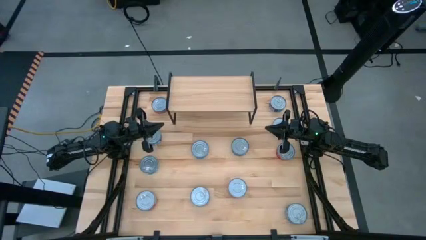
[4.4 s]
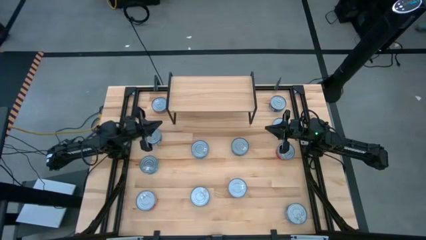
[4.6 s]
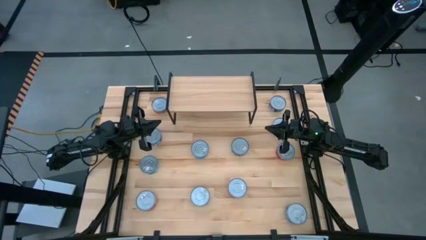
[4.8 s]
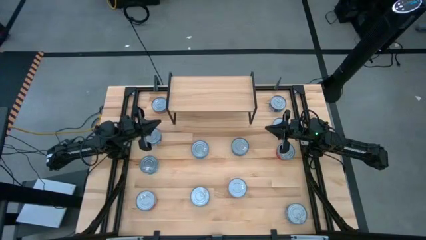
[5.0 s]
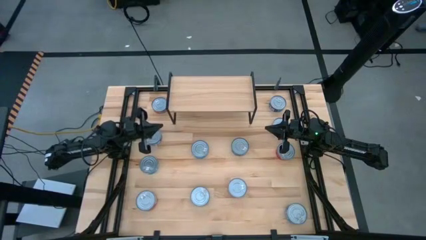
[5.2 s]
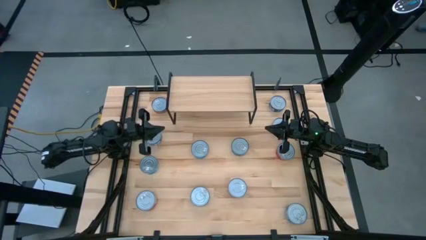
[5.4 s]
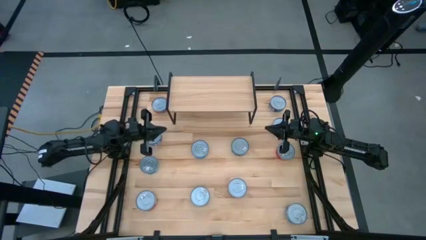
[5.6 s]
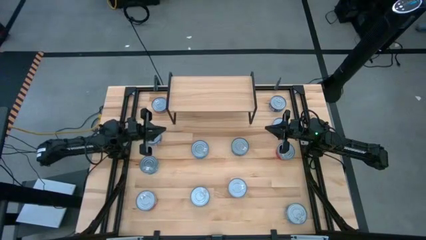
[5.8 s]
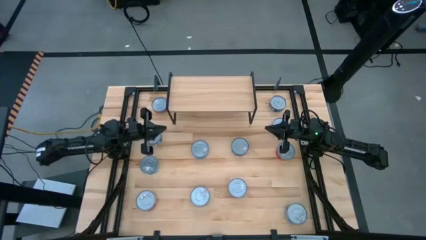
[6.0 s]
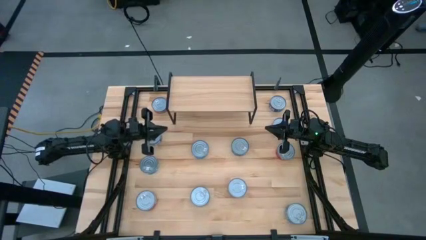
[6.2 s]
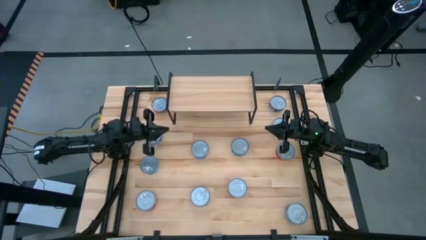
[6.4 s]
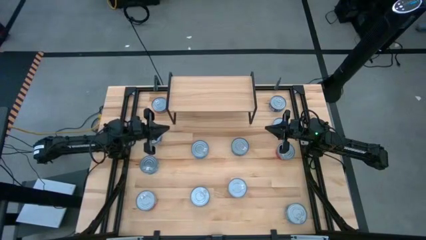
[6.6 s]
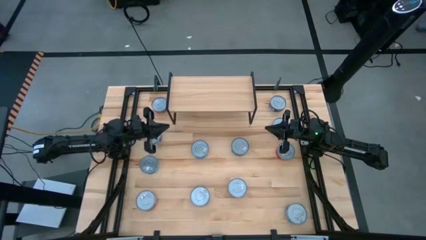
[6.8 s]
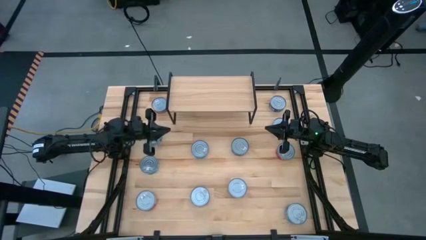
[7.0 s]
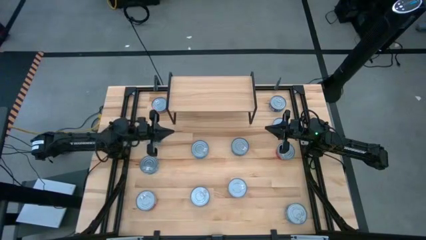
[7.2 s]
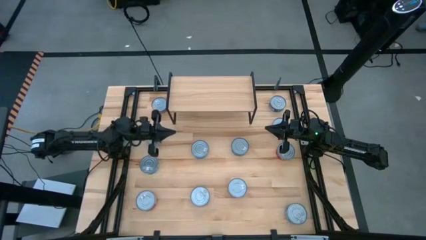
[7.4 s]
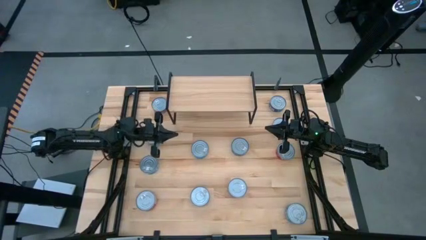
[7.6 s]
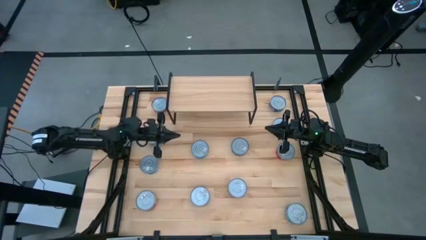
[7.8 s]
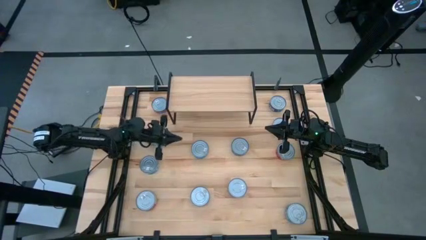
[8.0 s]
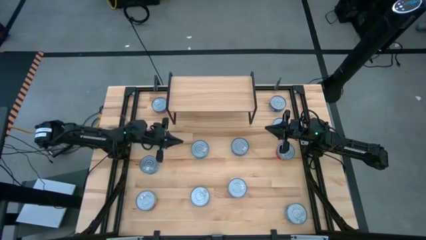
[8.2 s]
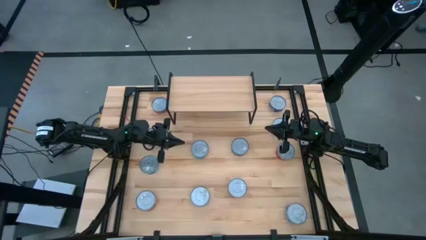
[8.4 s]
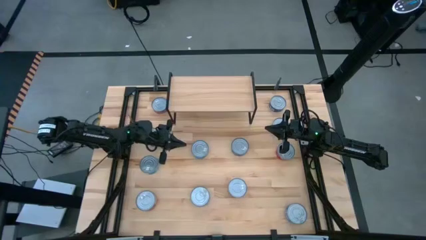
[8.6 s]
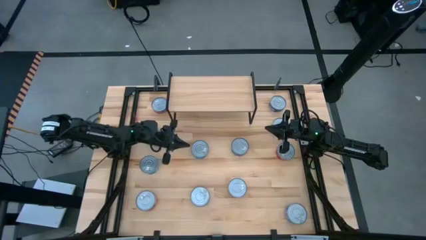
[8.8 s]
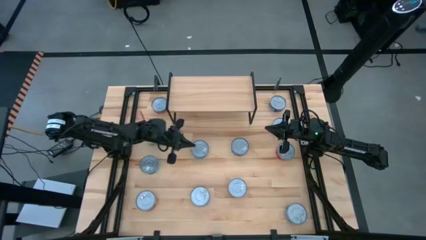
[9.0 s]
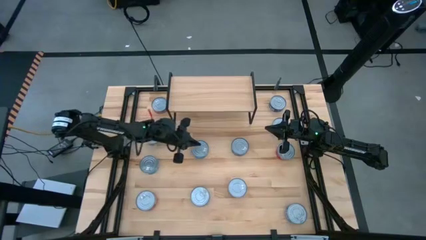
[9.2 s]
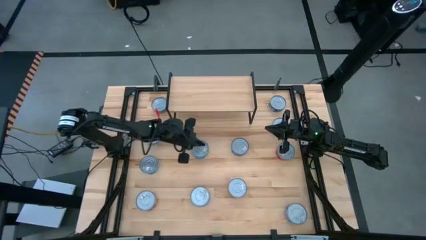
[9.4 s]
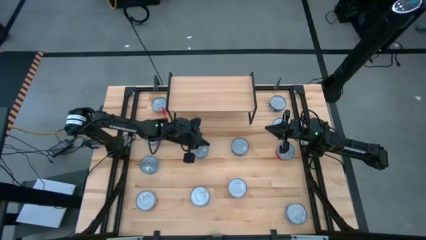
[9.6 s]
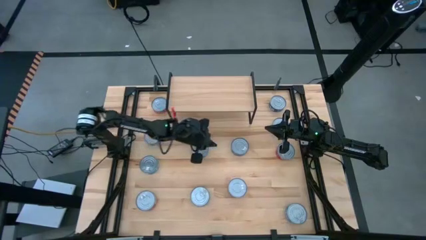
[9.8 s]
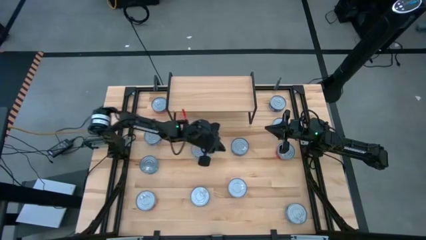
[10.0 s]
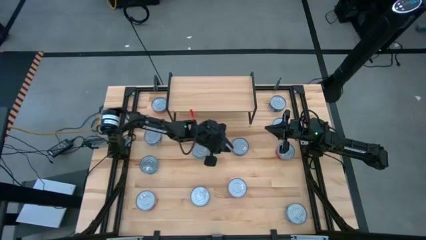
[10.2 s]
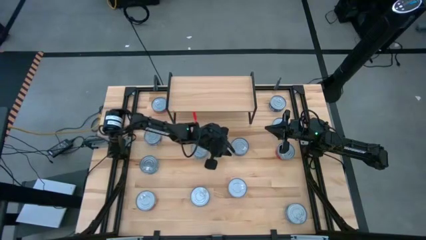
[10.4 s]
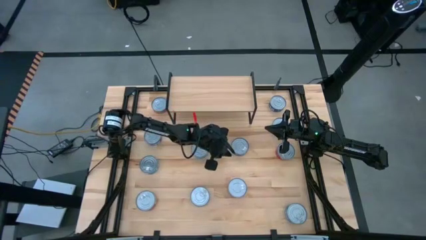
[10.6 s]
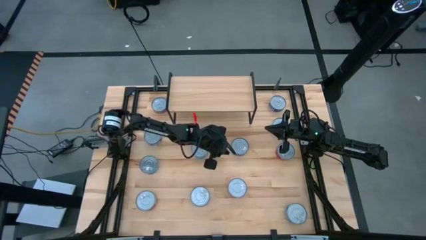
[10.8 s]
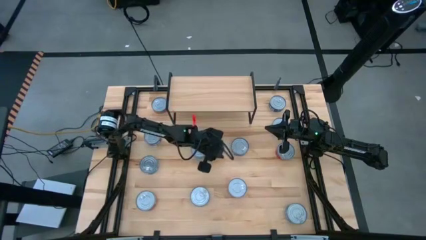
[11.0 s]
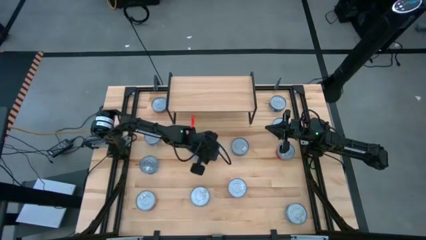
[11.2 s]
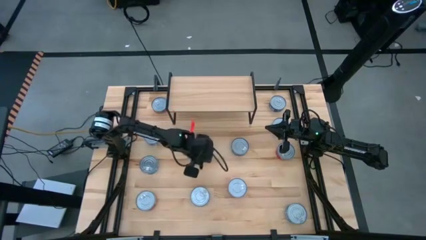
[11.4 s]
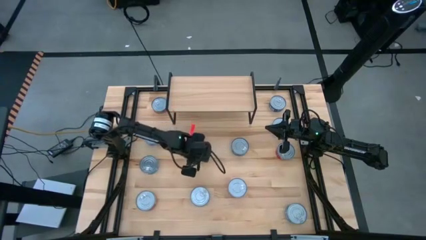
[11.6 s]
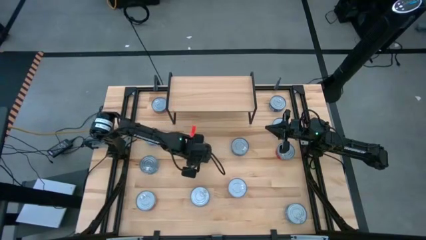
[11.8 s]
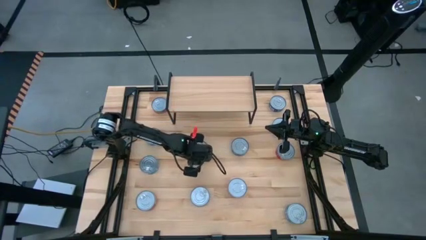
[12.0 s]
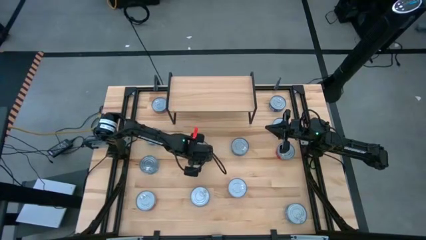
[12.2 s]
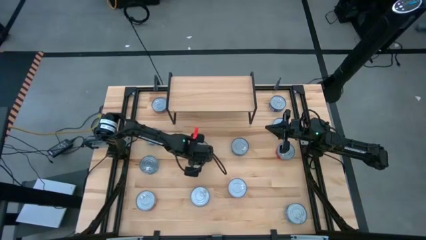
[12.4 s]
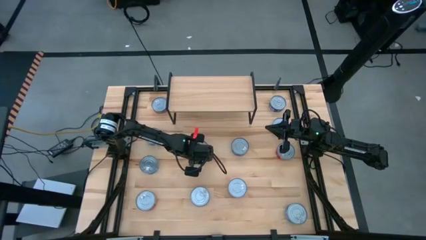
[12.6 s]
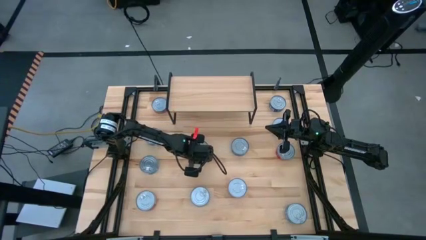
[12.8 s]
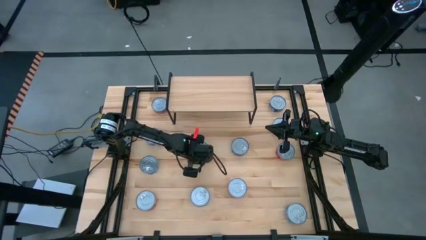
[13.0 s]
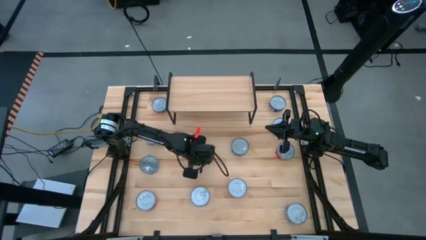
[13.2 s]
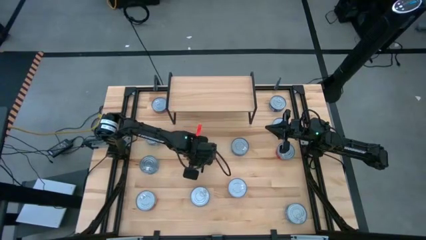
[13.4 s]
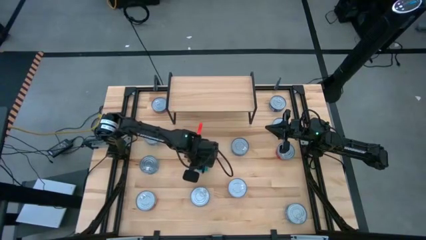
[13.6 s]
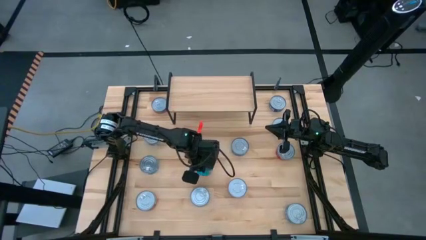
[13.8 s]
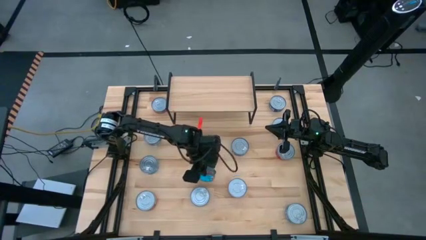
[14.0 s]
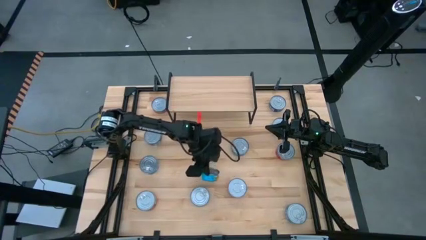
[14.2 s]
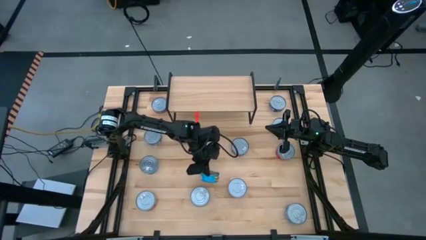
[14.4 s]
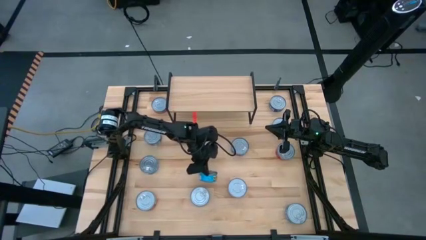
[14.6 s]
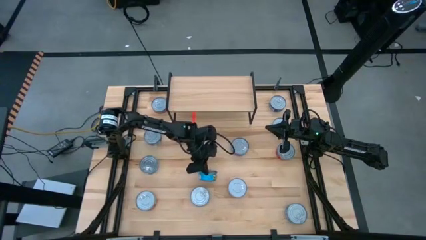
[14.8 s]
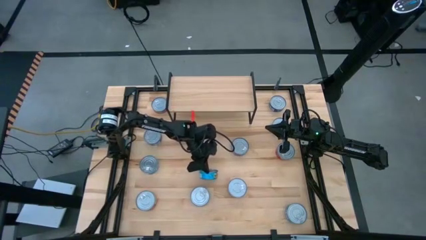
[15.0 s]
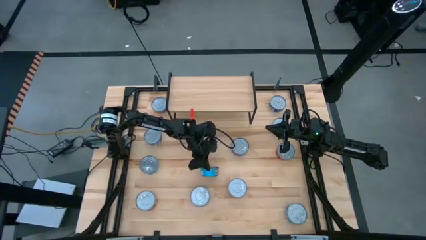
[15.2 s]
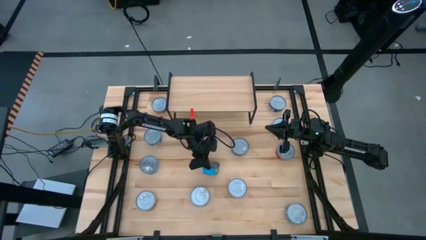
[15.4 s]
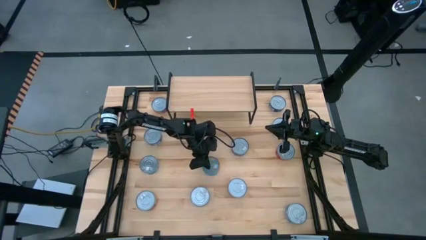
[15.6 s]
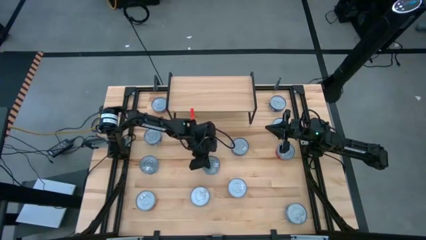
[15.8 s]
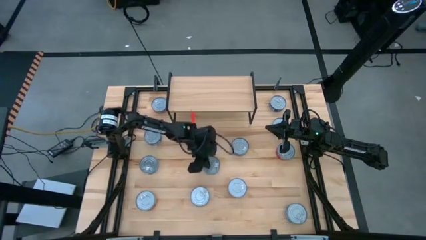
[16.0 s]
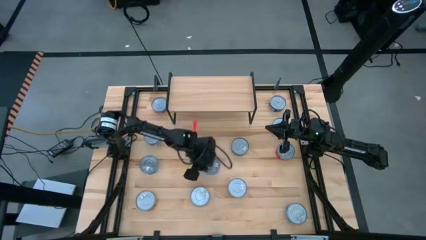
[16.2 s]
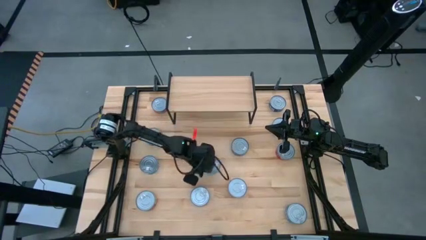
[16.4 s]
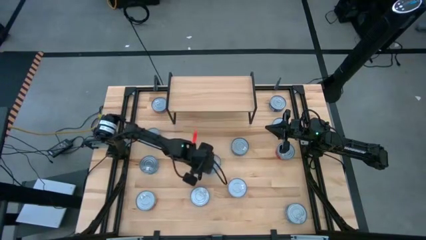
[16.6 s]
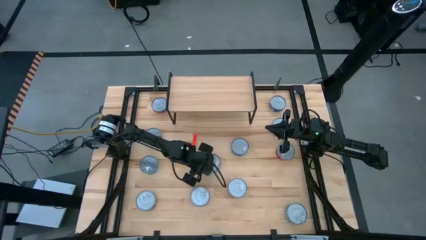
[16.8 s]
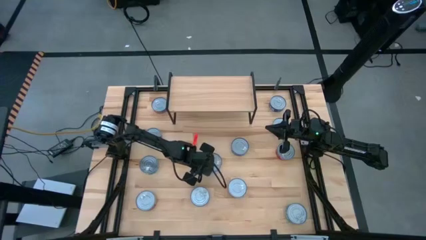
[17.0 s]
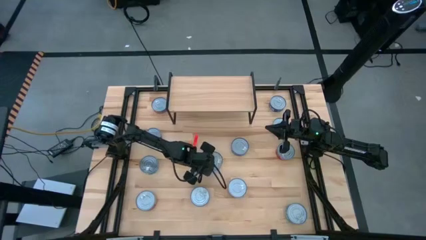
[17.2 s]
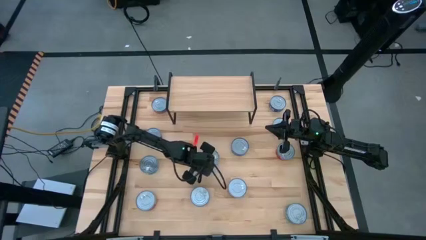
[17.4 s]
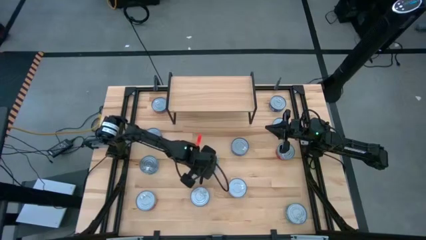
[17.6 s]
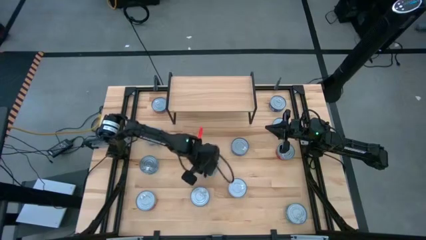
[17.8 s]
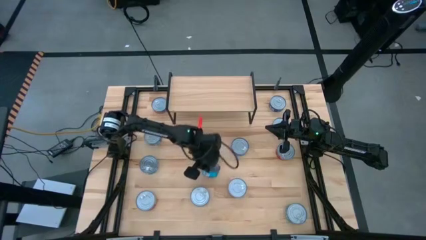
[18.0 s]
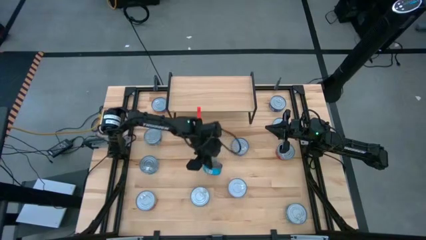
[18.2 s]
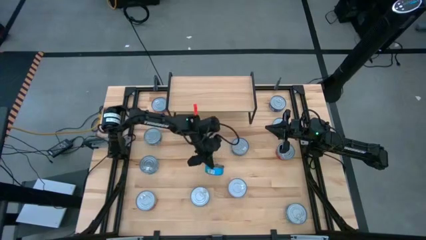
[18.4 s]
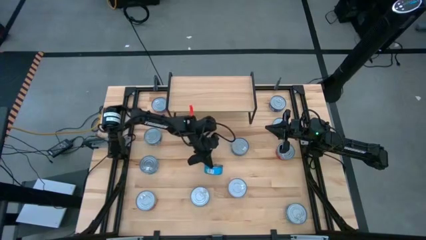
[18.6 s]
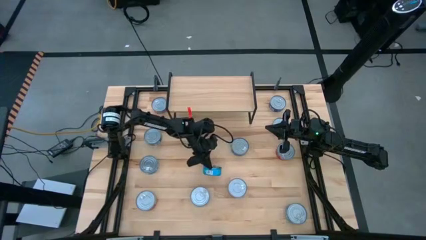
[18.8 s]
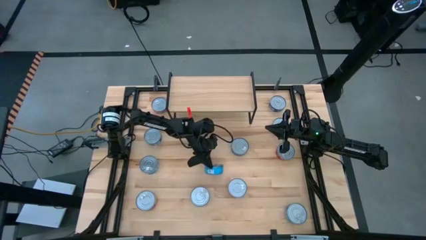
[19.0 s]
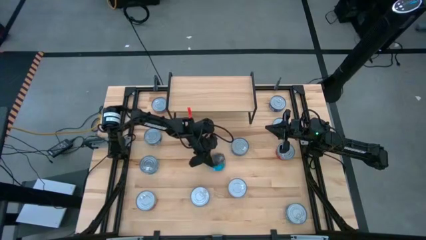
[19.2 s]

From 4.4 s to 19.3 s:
Task: Stack canned seafood by type on shelf
Put the yellow blue tuna can on the shelf
